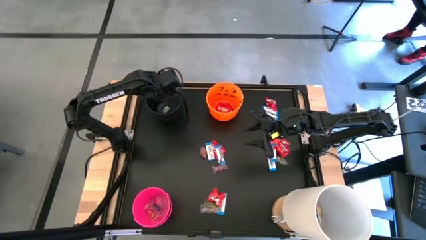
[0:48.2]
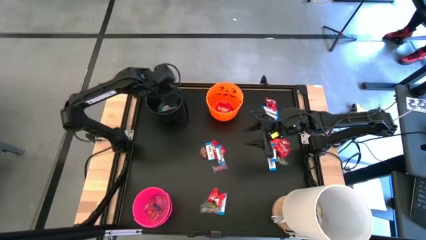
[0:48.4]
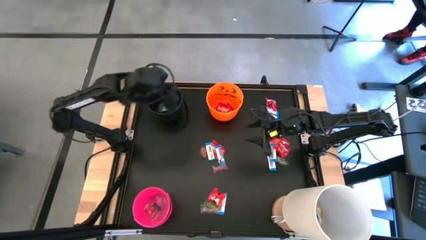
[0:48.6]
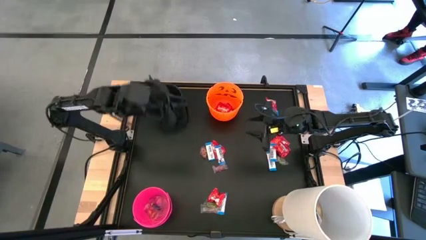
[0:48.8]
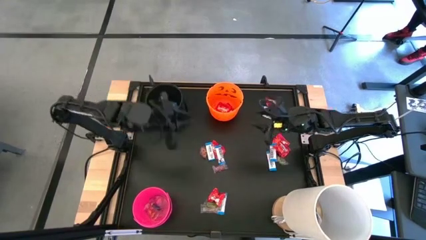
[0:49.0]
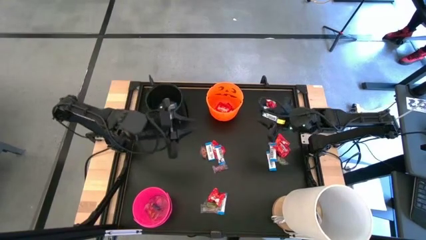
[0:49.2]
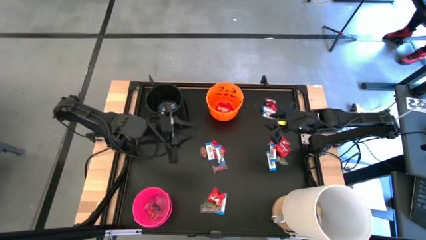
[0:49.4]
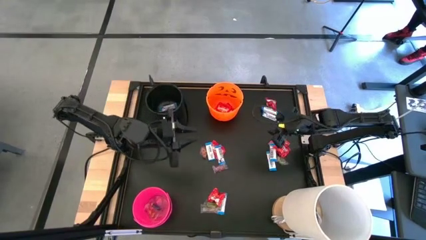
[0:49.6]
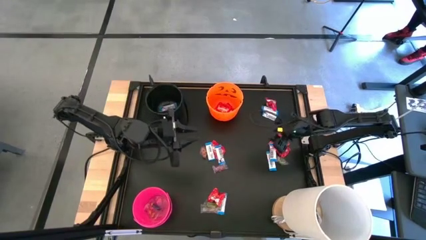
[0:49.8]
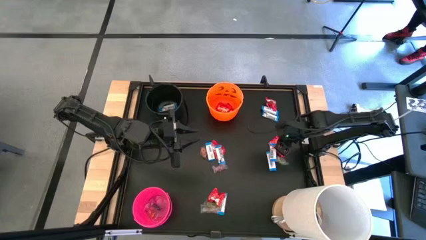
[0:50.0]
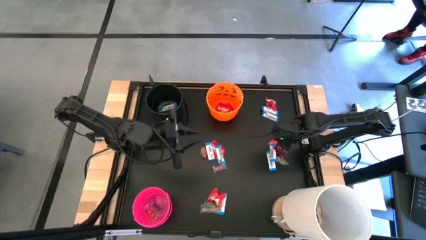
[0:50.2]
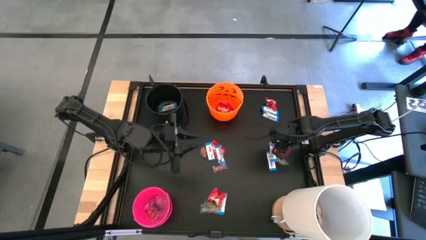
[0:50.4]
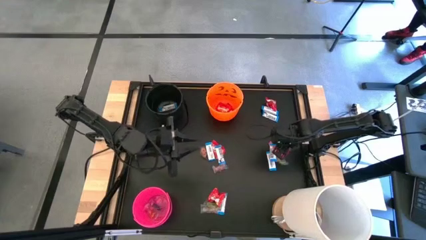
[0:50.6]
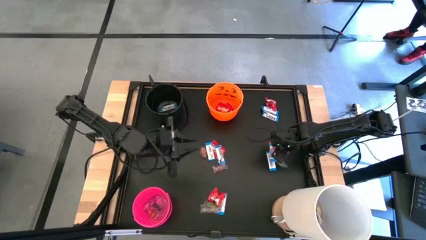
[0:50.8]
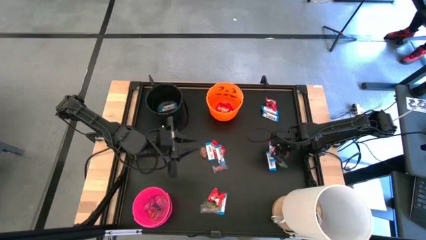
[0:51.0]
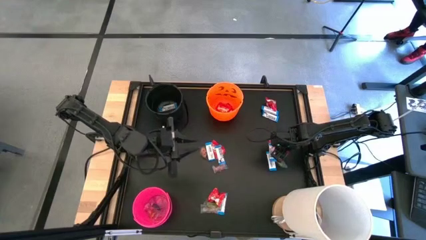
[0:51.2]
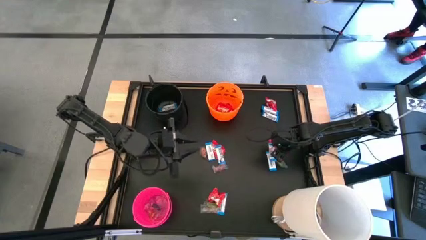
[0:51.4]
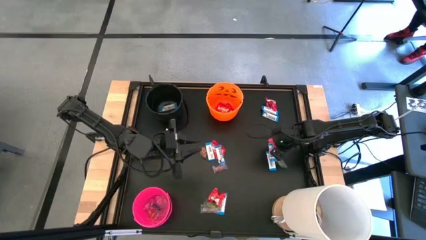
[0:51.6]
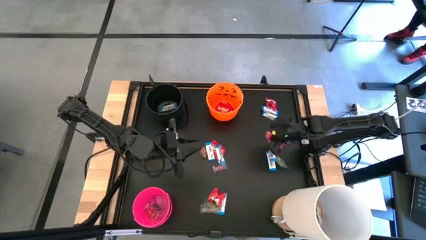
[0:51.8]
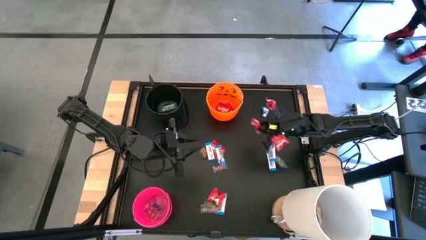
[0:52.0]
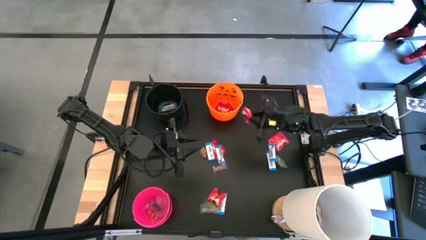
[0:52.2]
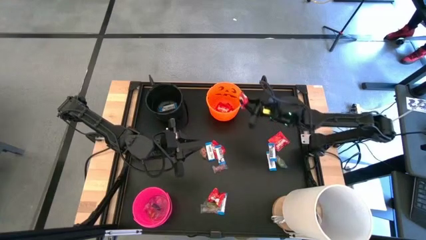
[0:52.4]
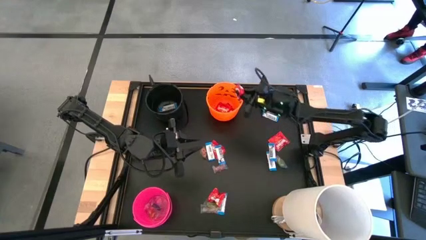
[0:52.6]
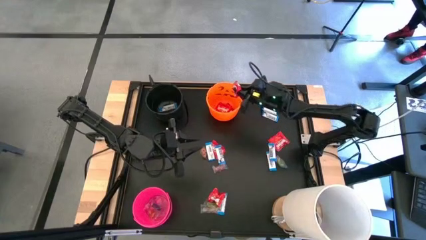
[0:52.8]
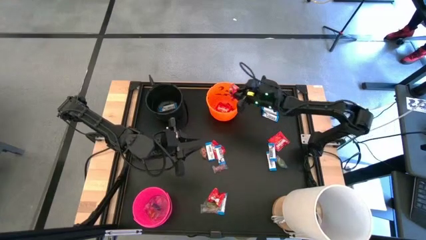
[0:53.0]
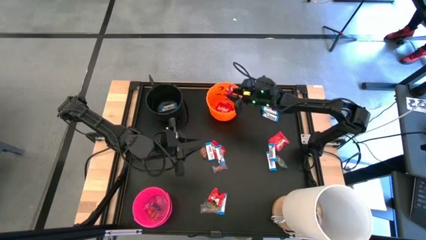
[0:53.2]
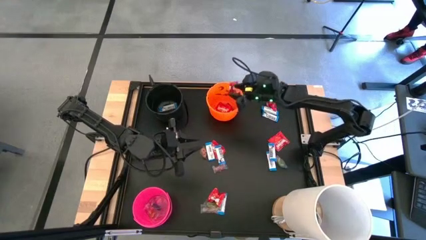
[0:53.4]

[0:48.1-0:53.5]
Task: Sort candy
Put the middle right red candy into the orange bin

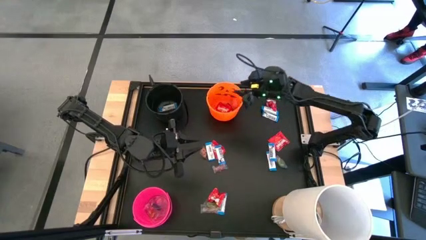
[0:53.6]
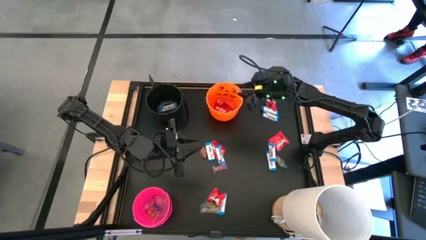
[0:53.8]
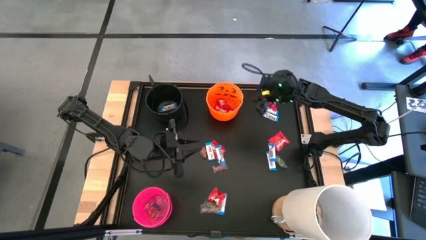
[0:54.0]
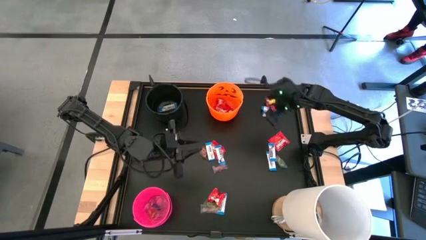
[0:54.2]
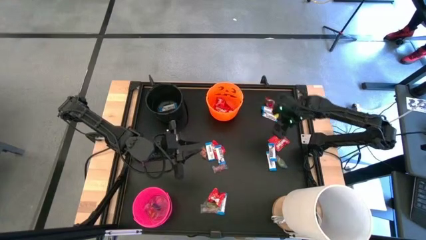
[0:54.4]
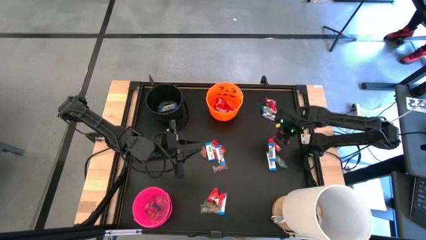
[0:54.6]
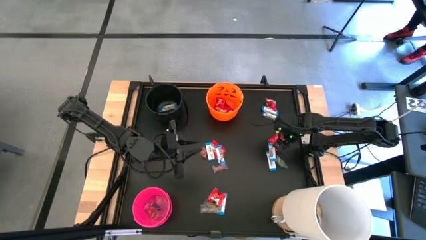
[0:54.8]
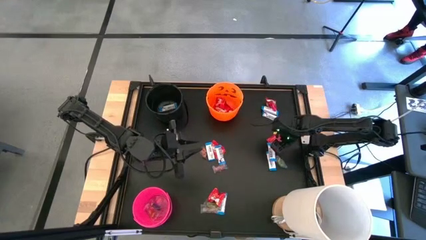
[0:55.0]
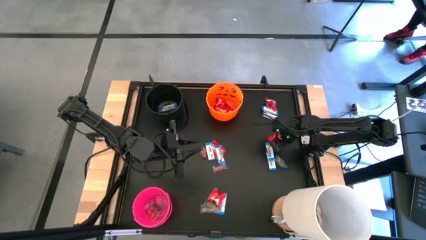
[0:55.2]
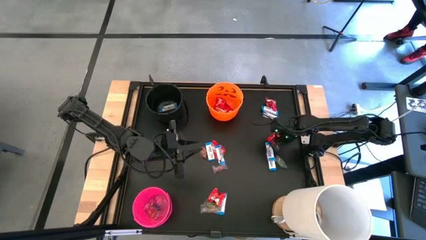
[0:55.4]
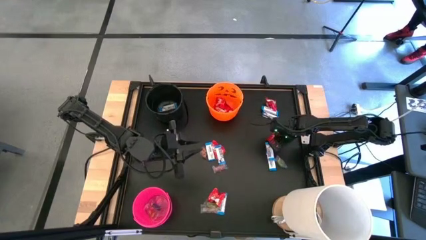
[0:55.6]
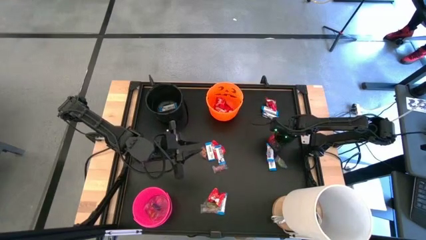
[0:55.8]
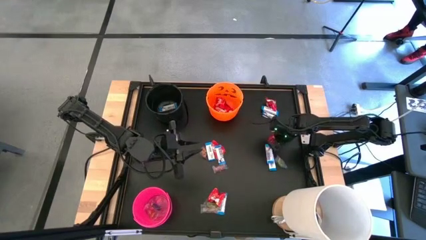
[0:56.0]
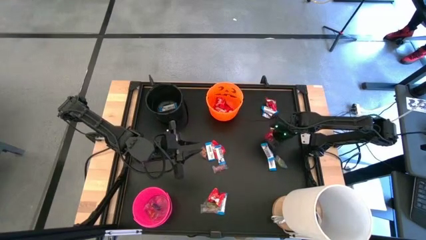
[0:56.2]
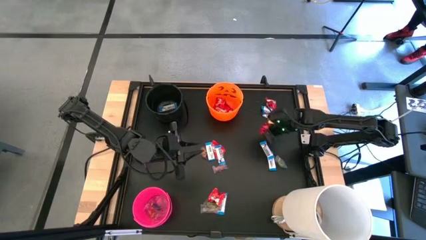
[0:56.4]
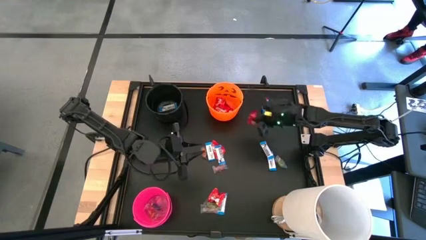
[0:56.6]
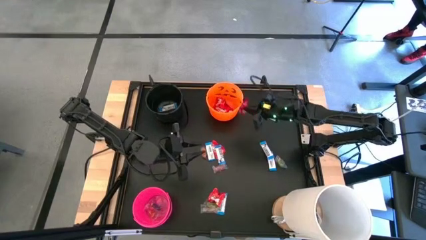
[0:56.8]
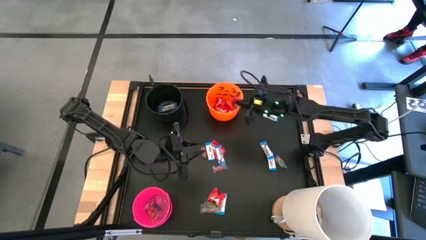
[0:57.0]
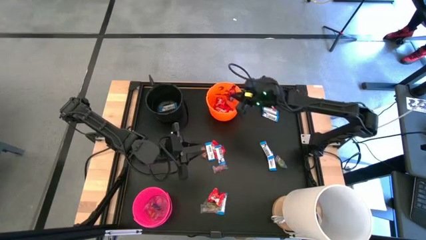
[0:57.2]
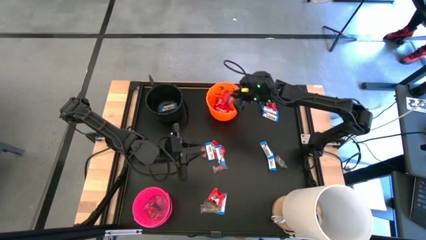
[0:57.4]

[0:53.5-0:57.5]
Put the middle right red candy into the orange bin

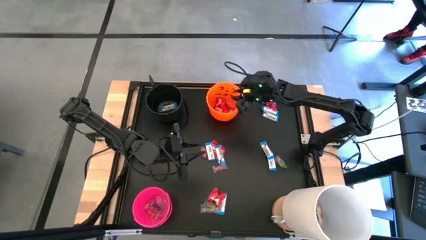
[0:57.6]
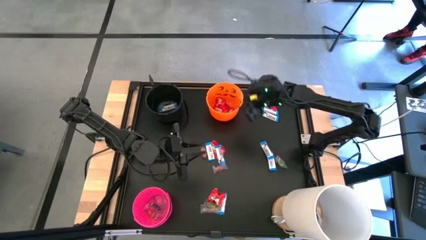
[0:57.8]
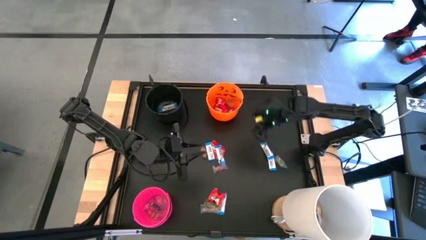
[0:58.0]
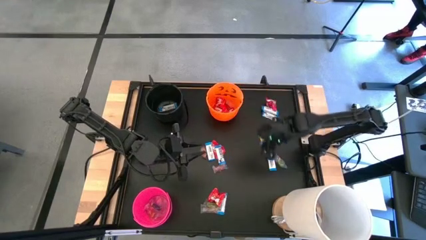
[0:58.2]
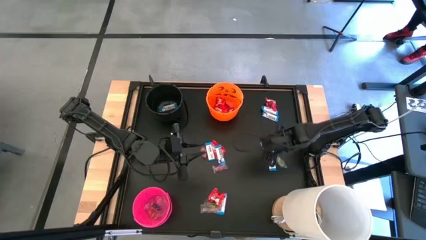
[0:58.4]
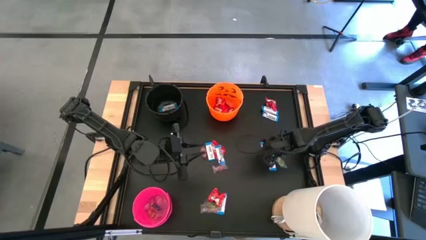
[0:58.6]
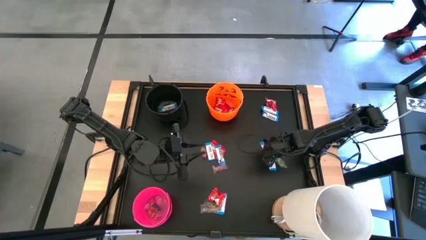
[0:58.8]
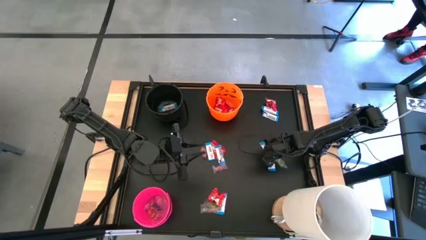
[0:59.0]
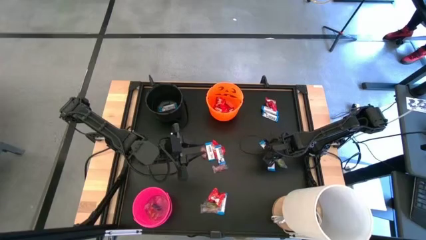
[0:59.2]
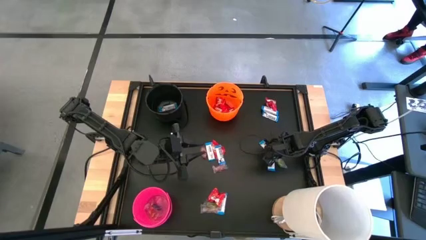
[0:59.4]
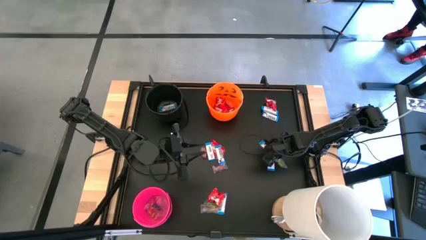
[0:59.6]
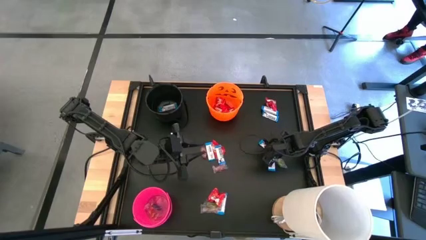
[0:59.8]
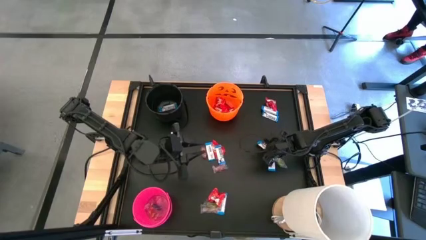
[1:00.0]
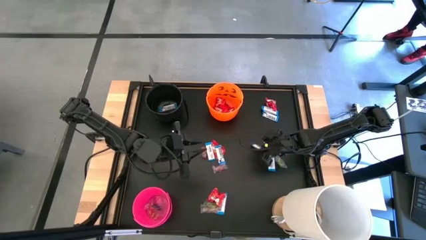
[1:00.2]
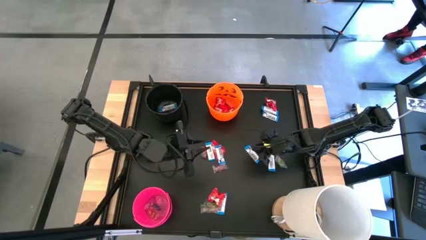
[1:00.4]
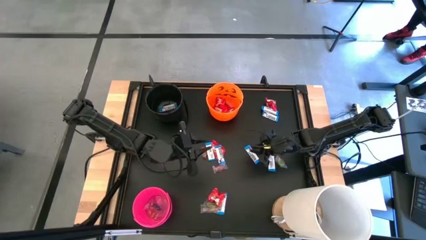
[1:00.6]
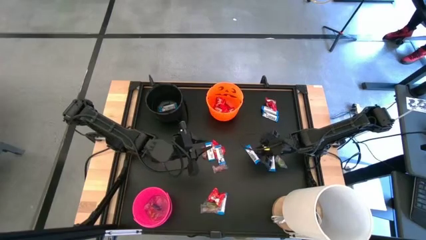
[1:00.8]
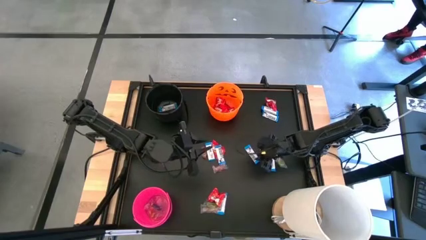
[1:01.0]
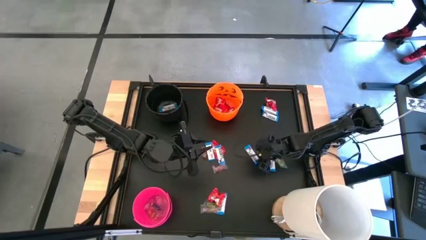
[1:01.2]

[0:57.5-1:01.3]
Put the middle right white candy into the black bin

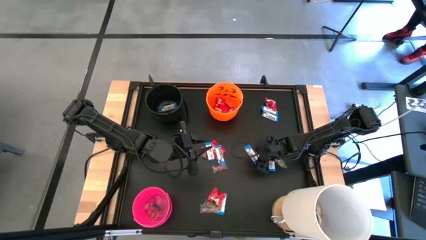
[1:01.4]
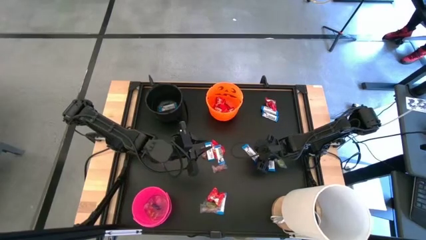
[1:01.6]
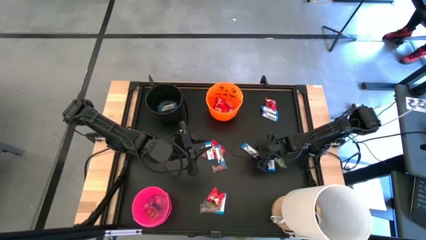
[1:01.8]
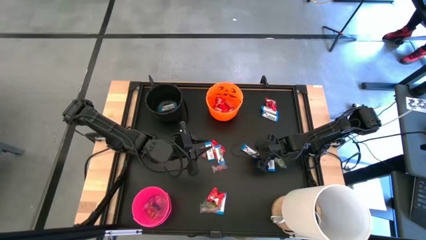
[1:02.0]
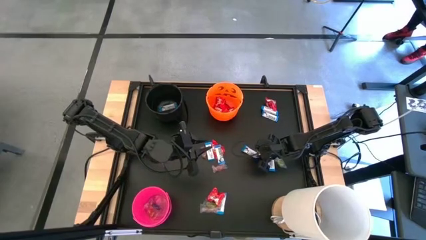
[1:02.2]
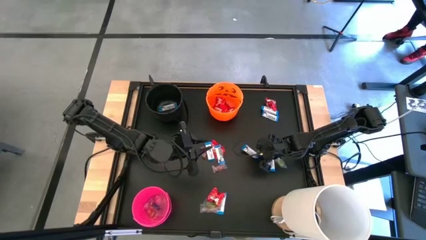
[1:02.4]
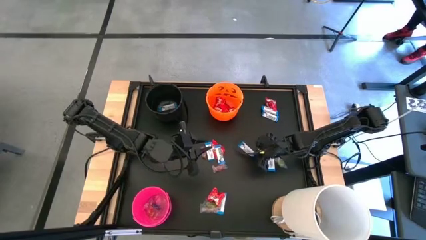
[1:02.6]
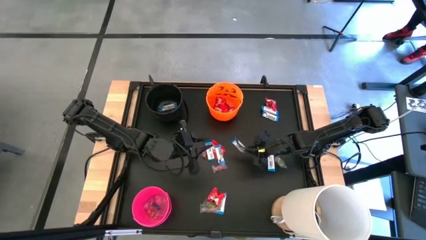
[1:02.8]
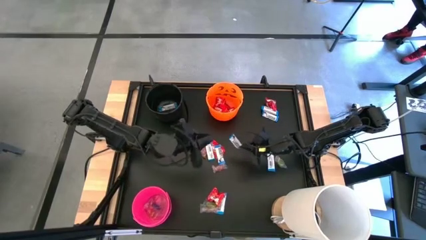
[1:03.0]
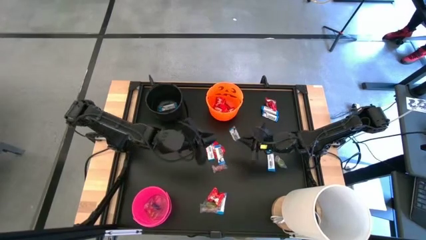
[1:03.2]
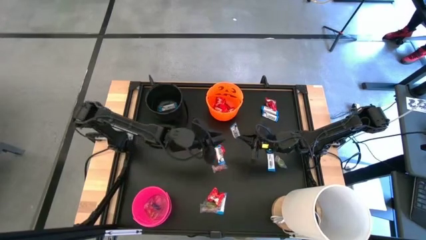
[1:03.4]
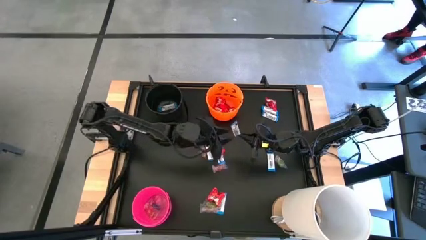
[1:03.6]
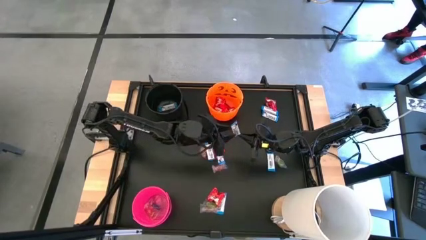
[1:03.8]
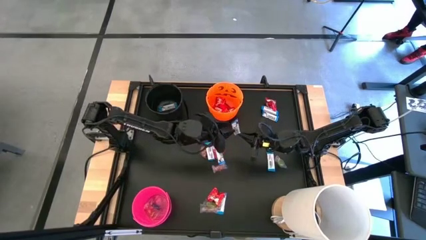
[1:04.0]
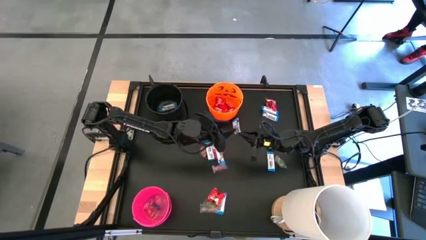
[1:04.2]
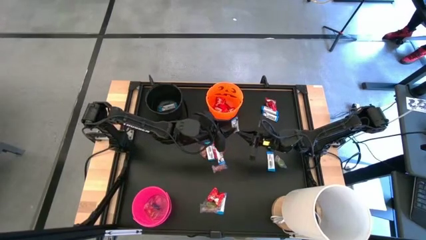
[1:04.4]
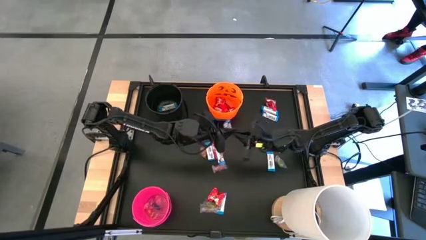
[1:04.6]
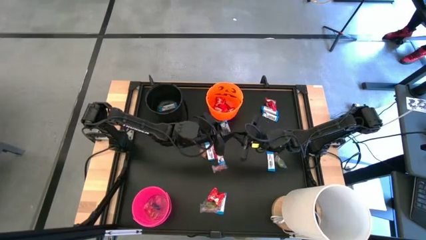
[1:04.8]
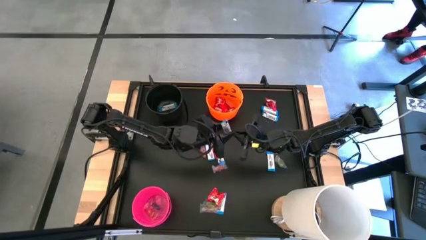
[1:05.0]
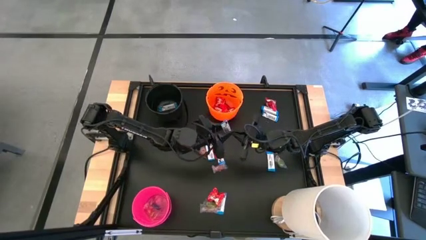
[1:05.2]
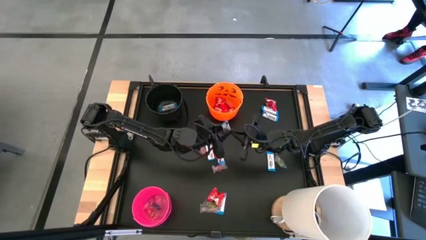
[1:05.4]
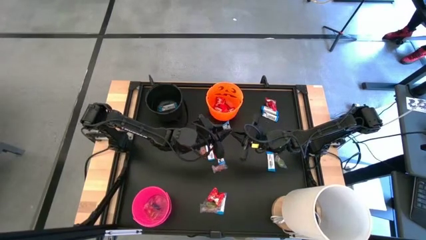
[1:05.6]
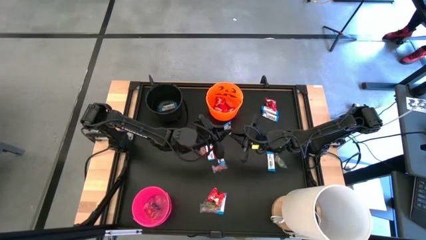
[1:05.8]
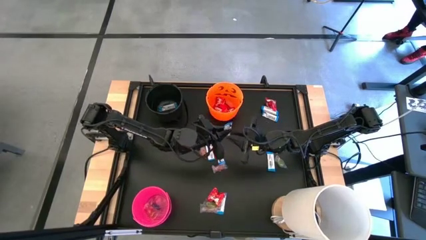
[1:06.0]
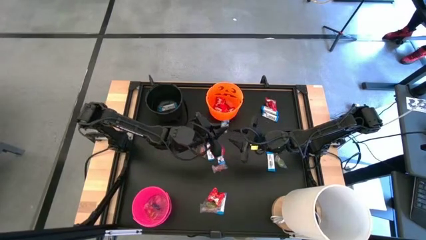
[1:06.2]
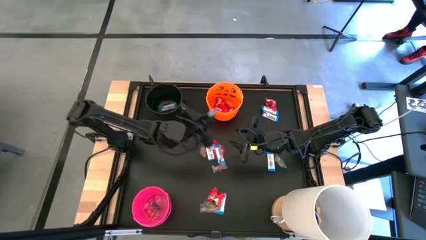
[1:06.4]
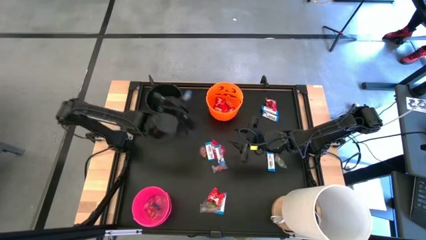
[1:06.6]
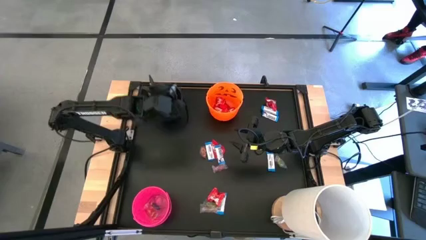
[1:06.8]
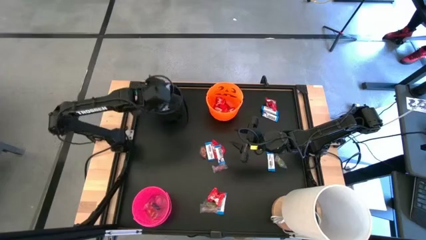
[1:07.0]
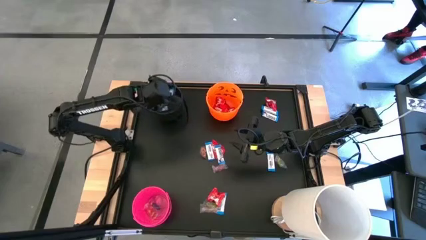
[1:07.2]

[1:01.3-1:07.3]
Put the middle right white candy into the black bin
